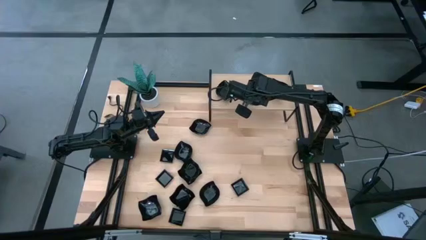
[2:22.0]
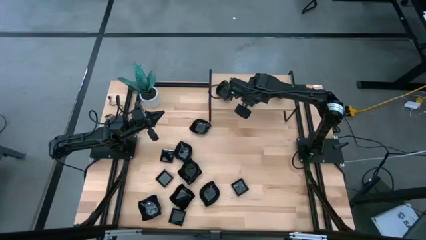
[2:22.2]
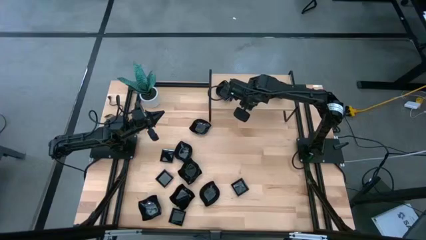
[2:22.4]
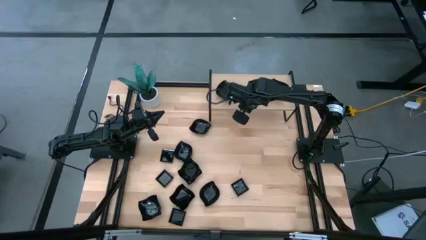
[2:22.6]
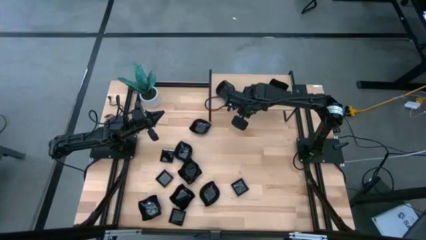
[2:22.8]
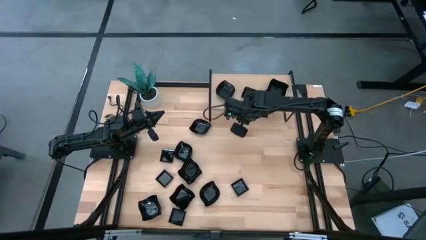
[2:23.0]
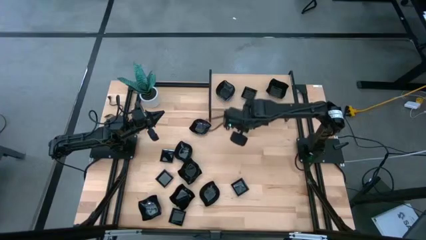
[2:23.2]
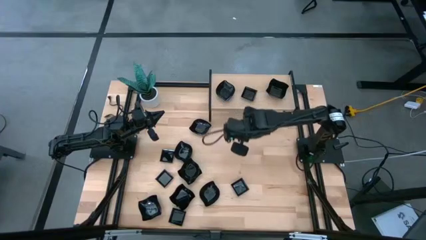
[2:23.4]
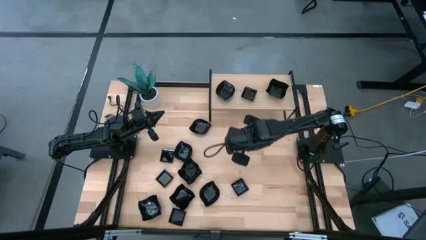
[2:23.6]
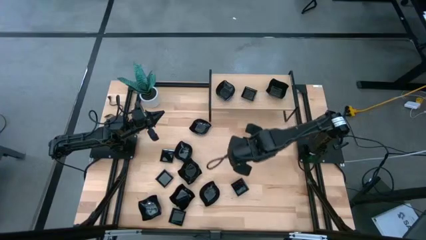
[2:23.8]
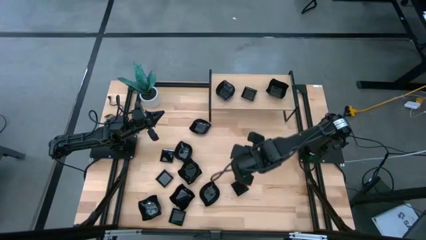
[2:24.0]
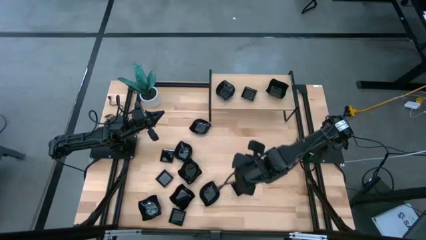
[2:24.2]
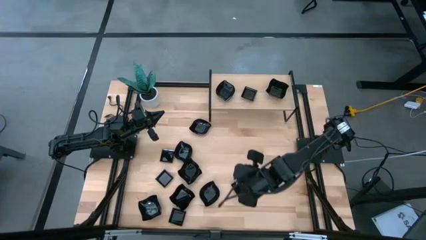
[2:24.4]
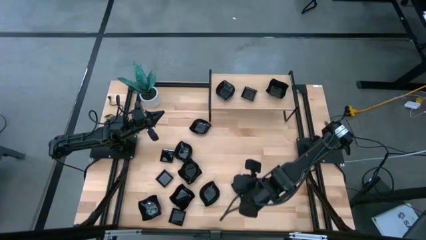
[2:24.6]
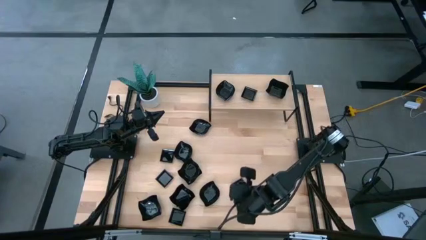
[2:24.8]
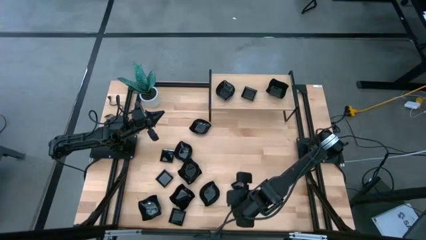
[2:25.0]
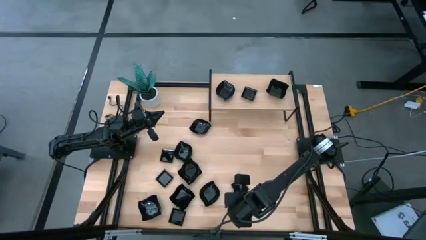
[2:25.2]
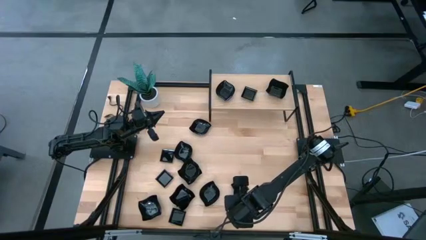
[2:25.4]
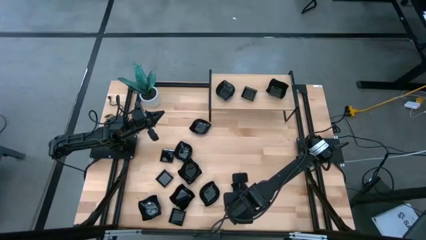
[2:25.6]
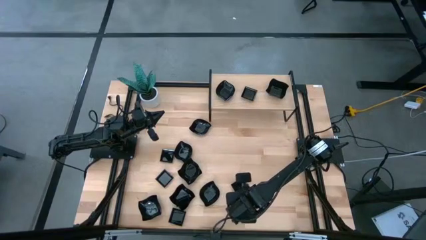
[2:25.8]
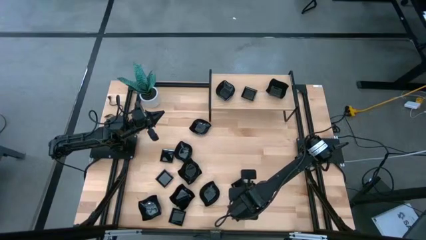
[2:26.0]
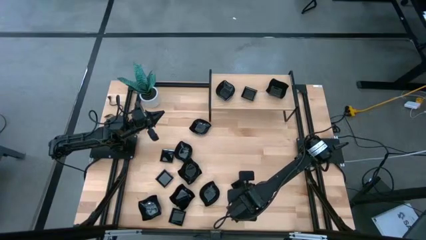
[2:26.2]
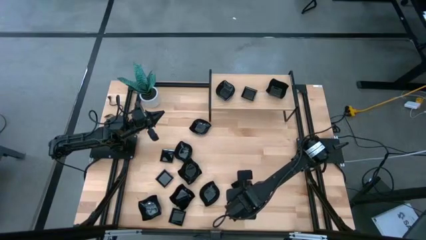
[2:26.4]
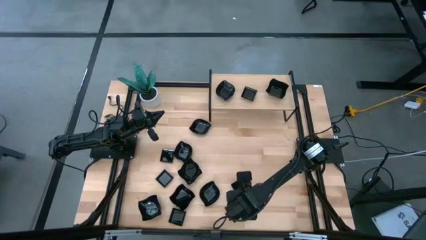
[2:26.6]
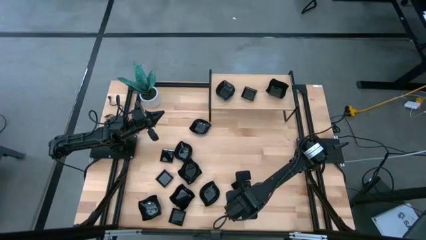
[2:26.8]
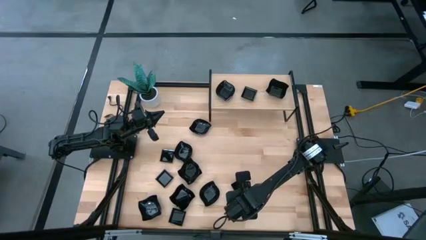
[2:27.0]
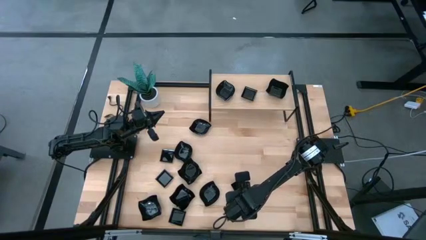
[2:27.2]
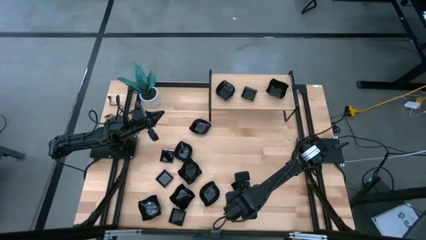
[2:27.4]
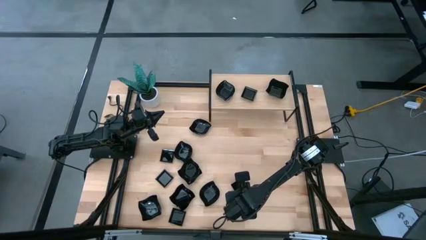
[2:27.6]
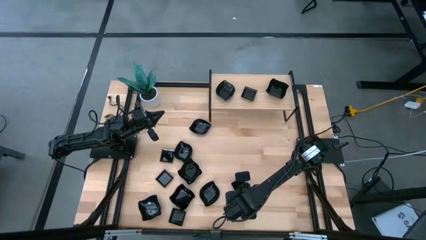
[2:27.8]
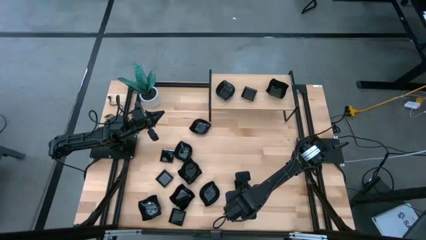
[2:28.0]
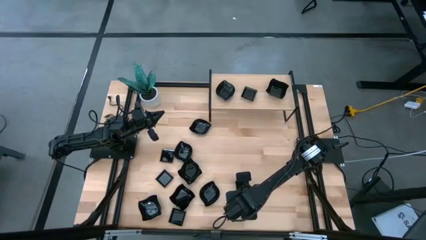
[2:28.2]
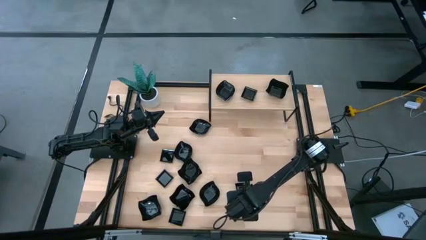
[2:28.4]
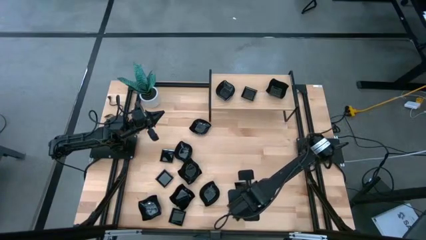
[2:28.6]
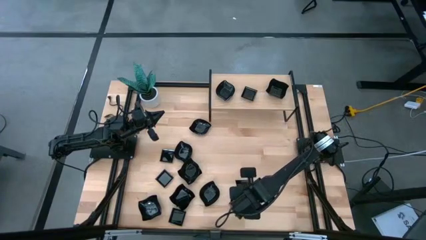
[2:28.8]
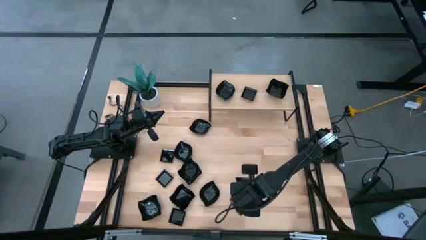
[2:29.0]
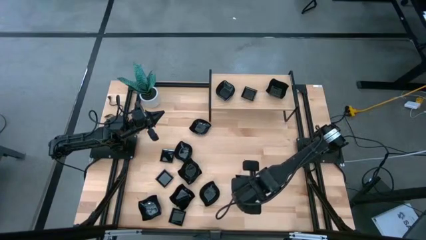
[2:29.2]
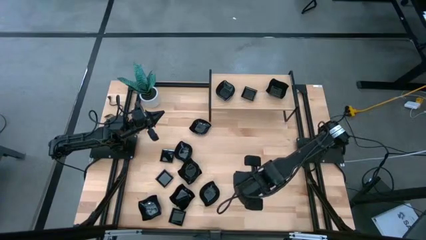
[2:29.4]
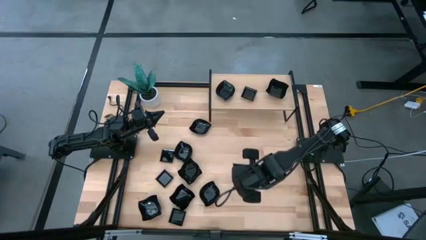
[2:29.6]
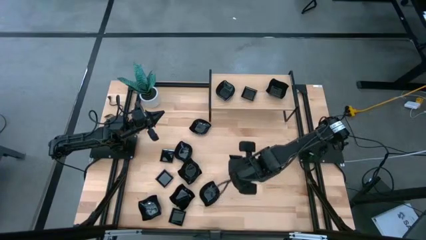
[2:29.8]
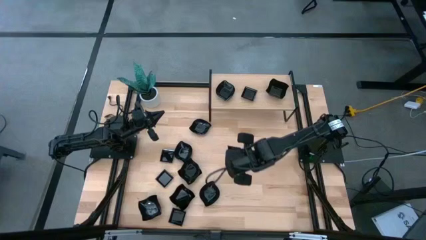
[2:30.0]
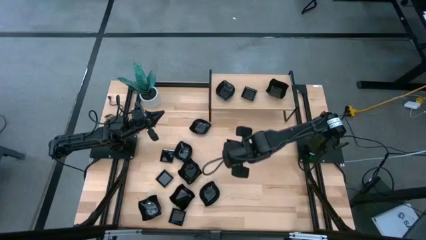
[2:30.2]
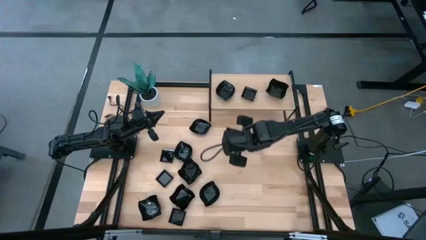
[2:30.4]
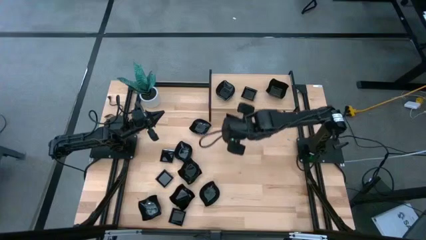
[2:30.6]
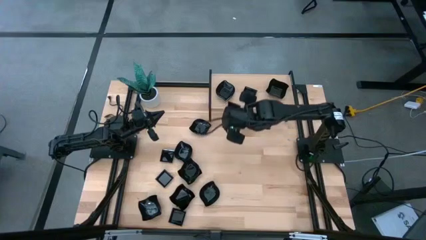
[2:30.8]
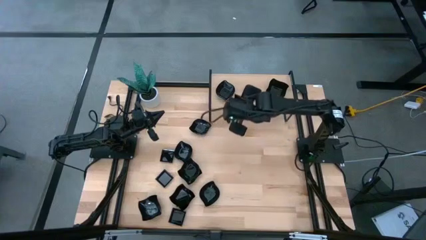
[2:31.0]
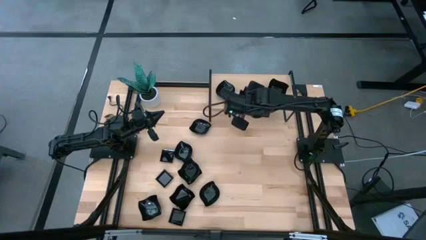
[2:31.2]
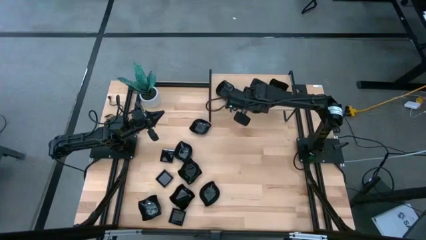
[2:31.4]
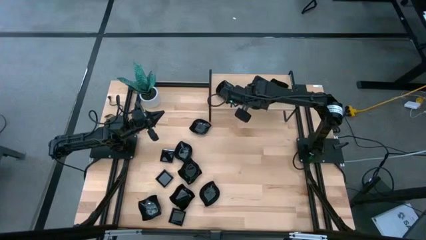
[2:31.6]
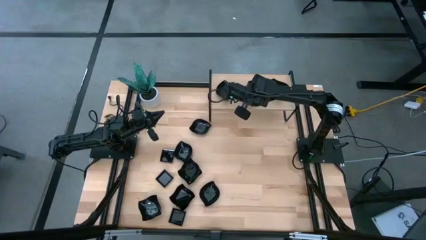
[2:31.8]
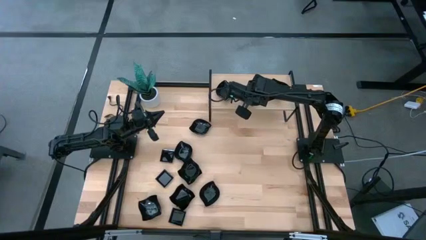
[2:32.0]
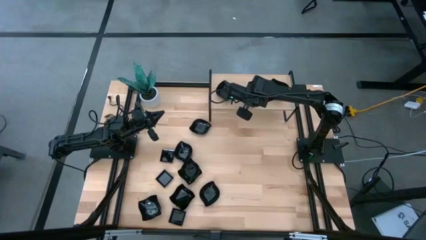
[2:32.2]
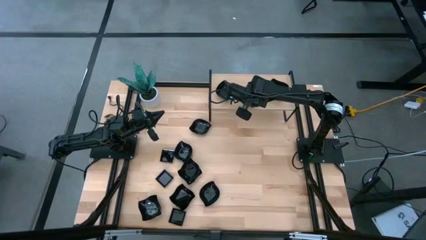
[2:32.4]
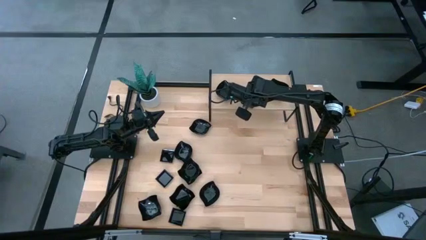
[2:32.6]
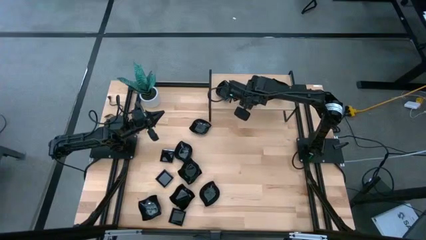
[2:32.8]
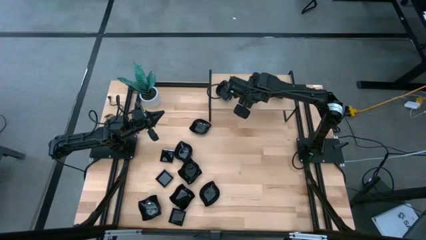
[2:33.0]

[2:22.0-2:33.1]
Task: Pick & Place Mini shaped plates
Stack the black square plate on top of the black square plate on the shelf

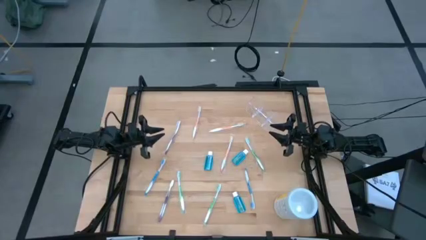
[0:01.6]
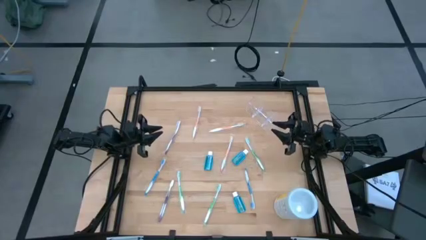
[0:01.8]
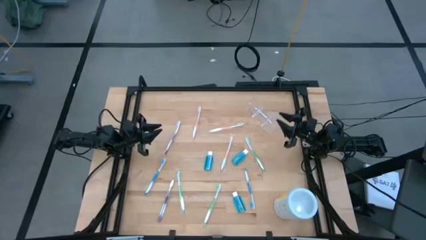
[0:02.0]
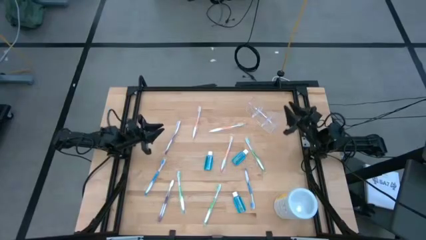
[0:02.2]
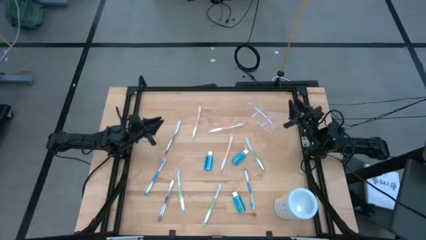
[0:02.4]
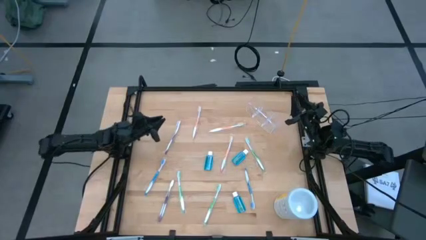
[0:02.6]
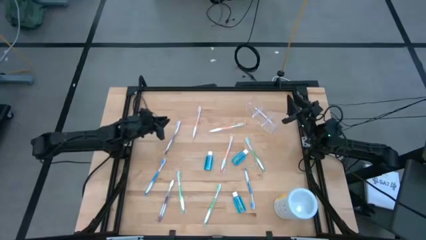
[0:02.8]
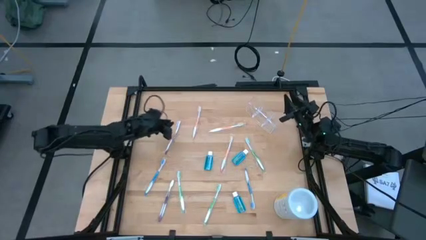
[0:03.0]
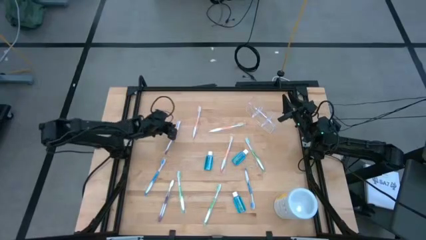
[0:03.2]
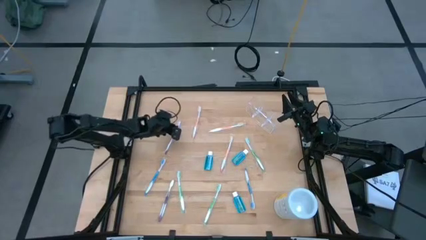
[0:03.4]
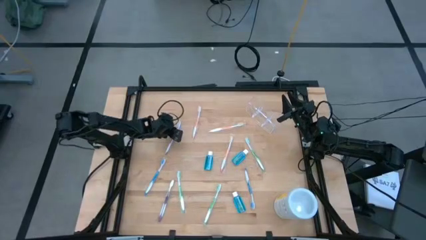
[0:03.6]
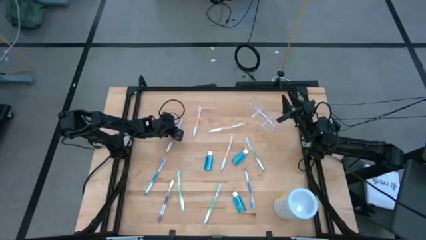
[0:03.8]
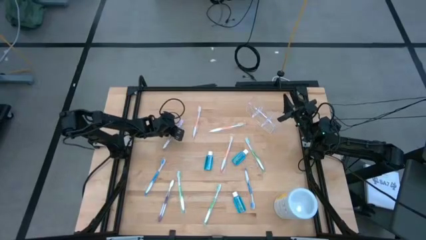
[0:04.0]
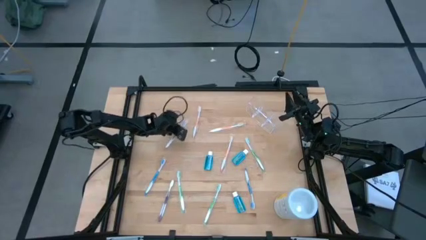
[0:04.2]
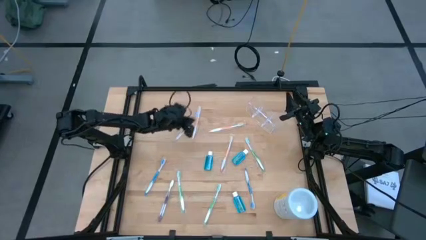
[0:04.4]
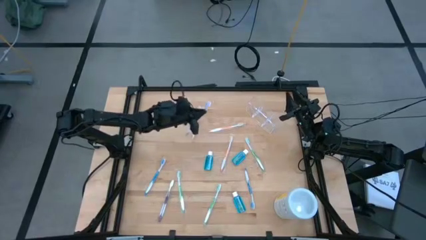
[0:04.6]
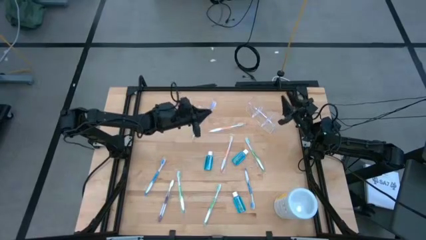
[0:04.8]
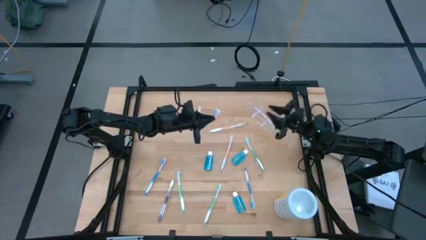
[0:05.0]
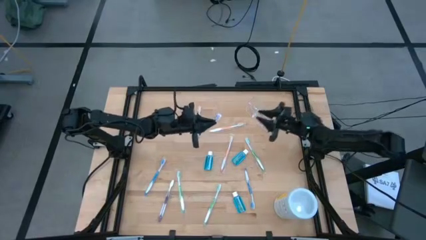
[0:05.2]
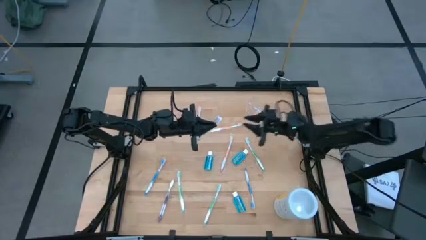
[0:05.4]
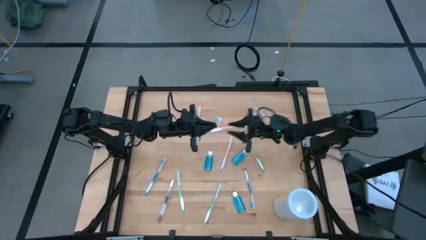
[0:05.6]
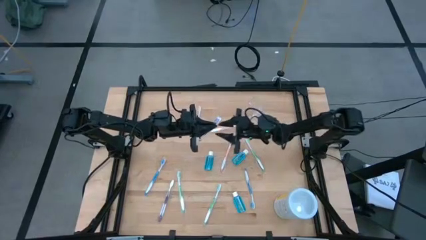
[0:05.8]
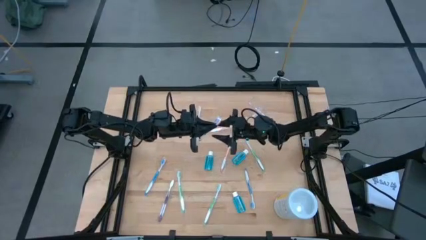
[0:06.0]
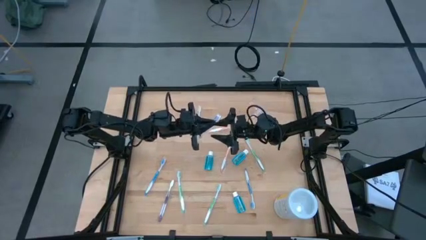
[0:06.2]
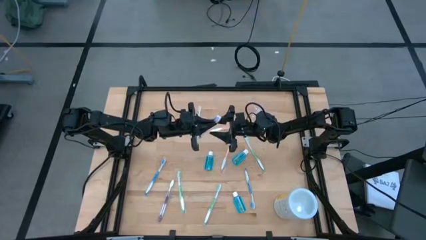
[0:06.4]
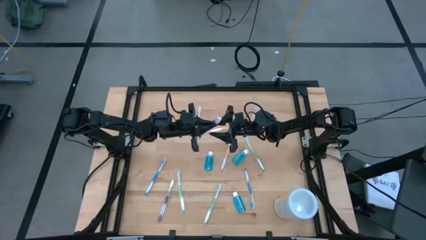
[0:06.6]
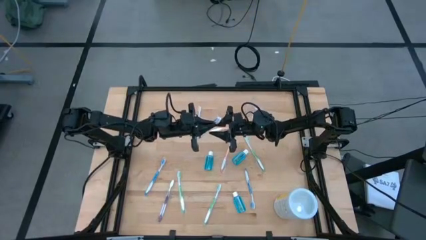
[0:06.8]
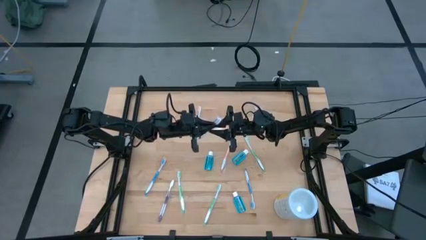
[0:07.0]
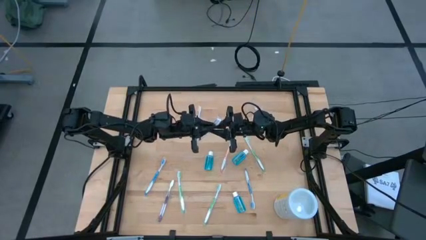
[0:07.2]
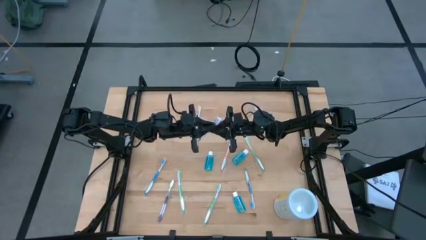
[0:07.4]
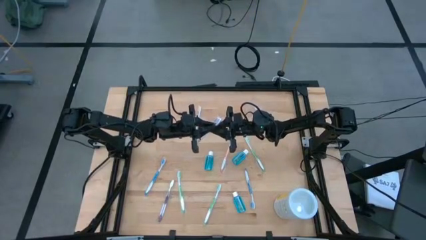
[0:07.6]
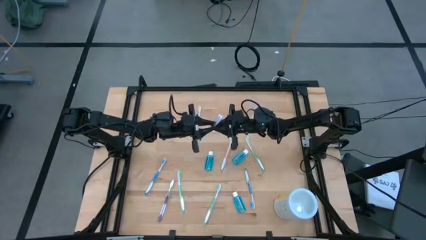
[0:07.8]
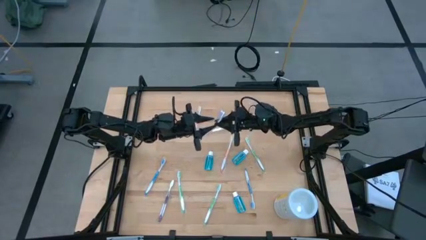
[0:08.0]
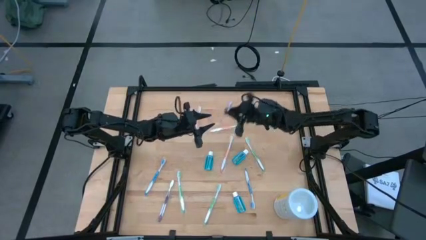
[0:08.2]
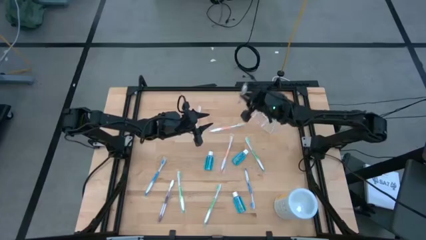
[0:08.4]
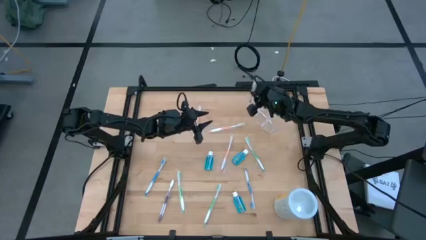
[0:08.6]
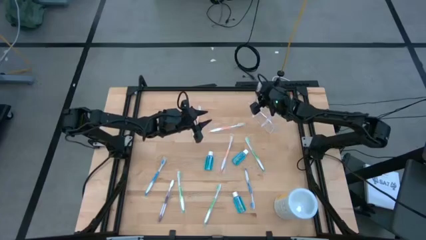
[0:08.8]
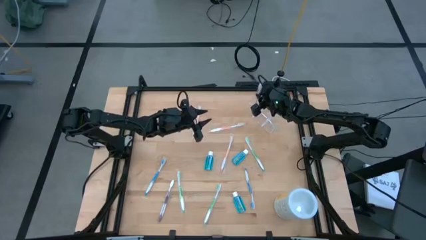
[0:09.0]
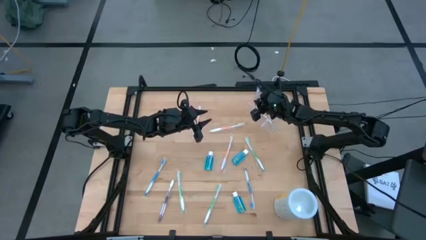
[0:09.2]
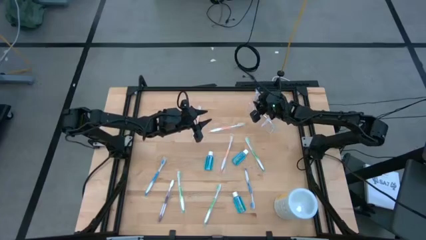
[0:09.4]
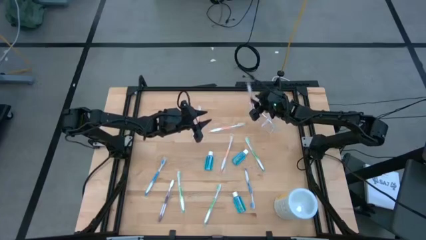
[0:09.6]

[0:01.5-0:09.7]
Task: Pick & Place toothbrushing station
Put the top purple toothbrush into the transparent organizer
